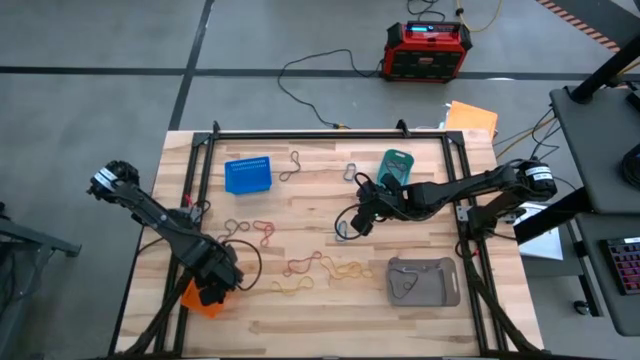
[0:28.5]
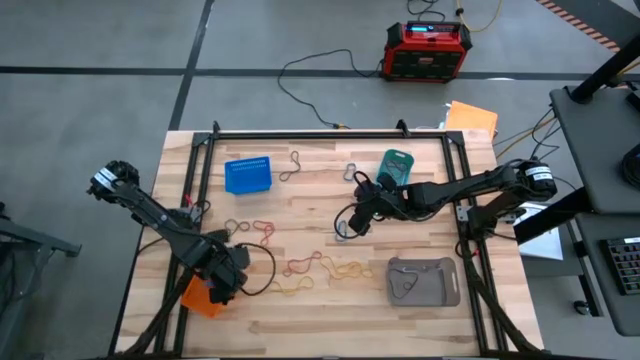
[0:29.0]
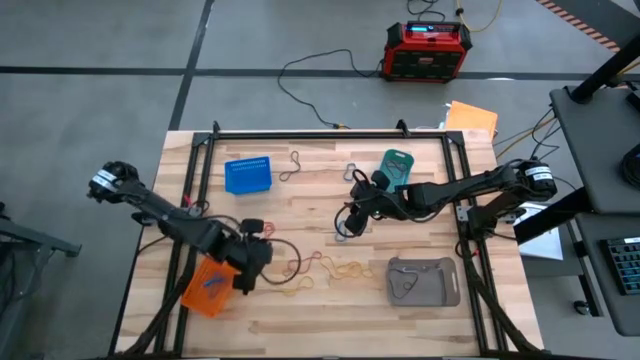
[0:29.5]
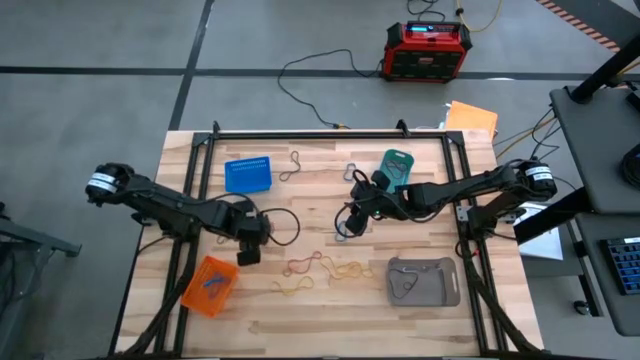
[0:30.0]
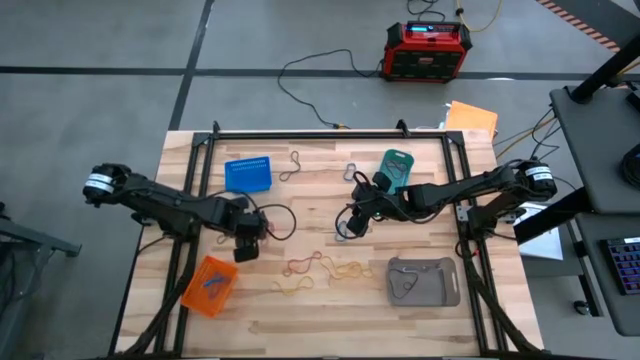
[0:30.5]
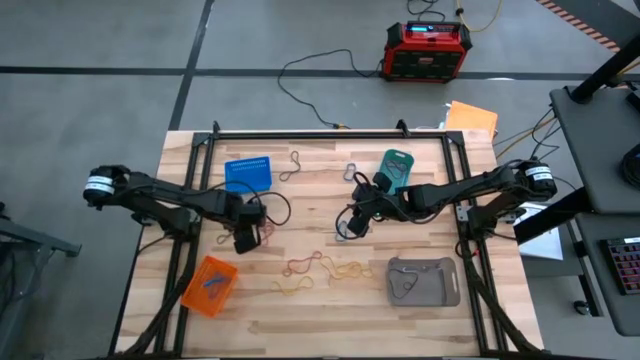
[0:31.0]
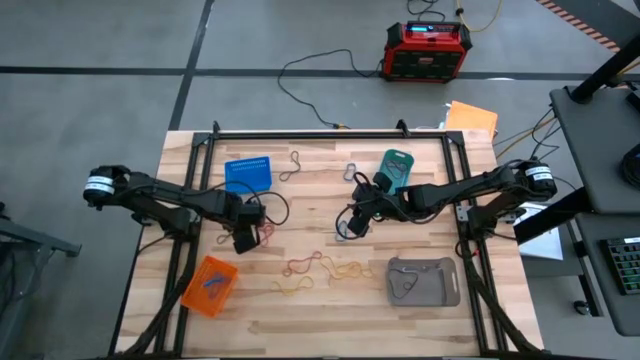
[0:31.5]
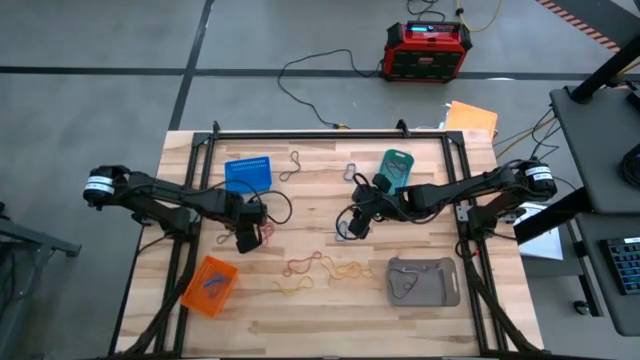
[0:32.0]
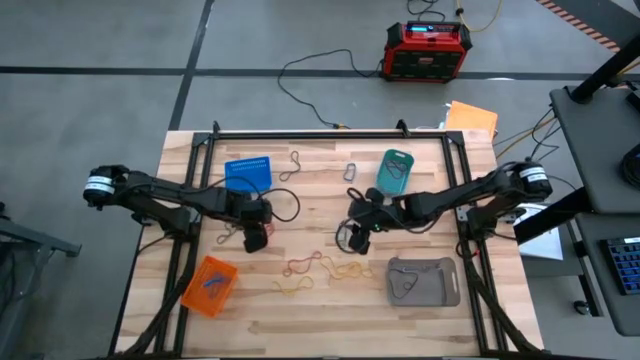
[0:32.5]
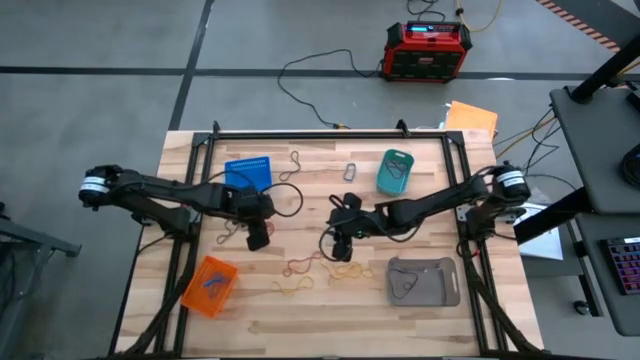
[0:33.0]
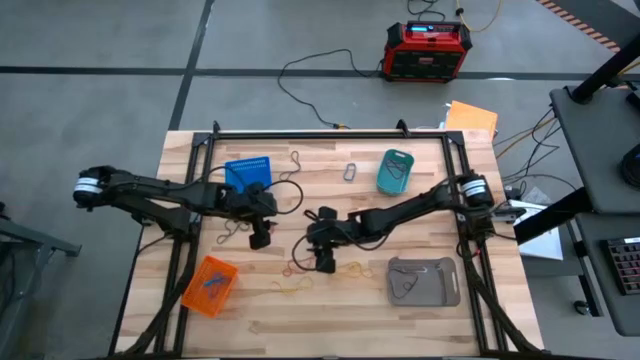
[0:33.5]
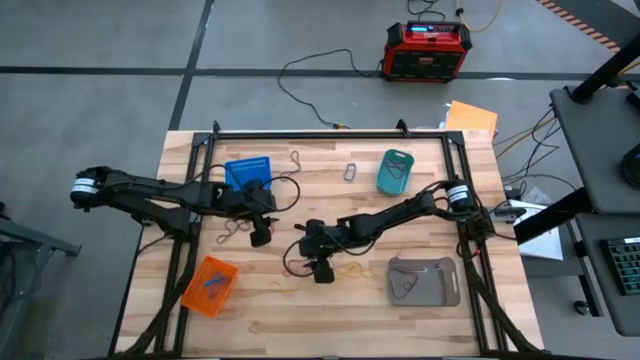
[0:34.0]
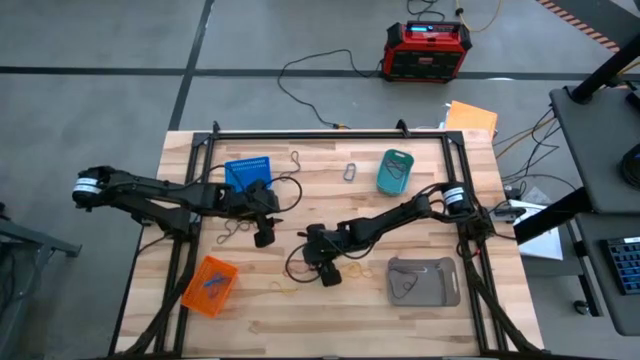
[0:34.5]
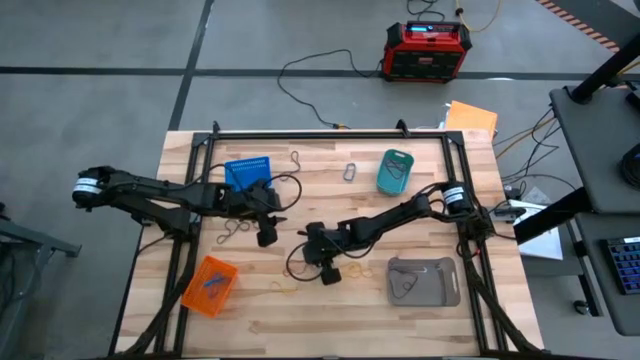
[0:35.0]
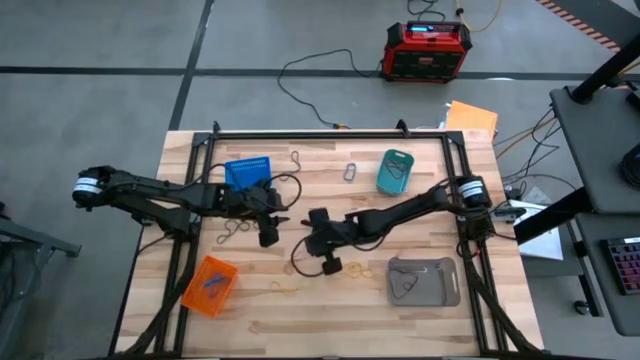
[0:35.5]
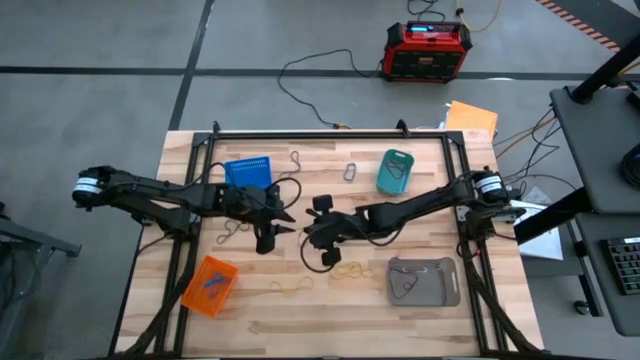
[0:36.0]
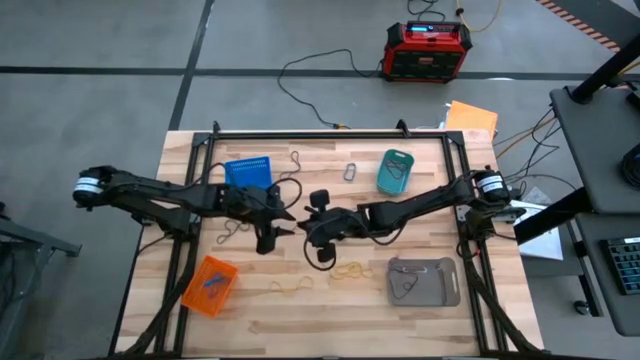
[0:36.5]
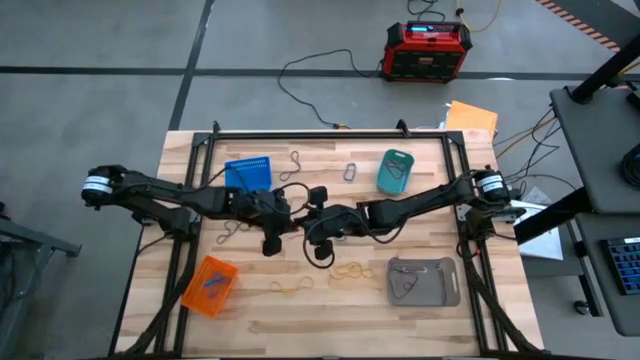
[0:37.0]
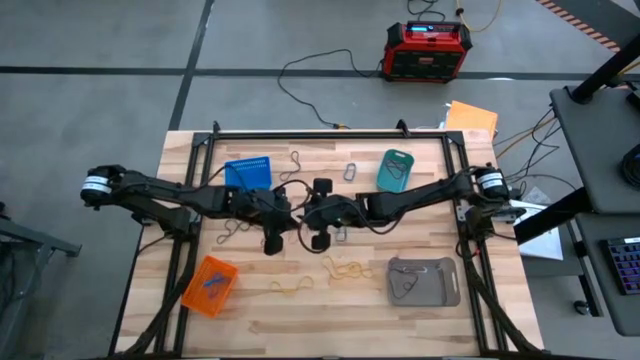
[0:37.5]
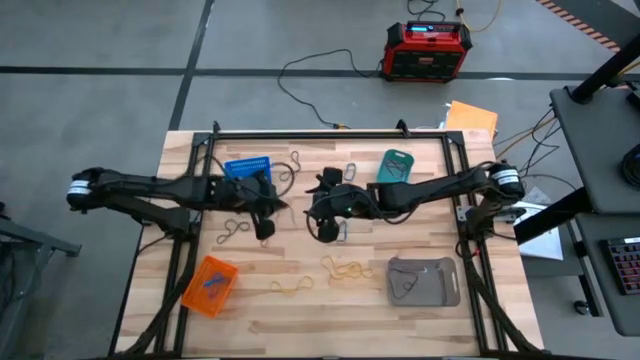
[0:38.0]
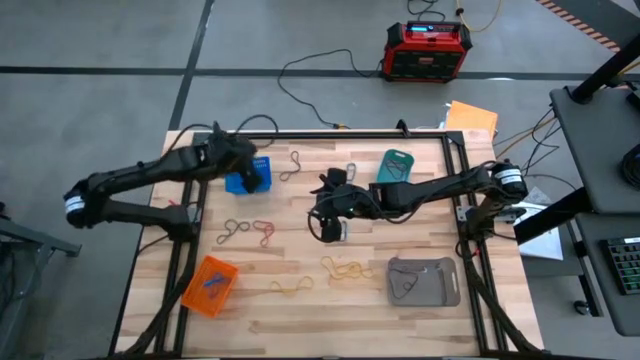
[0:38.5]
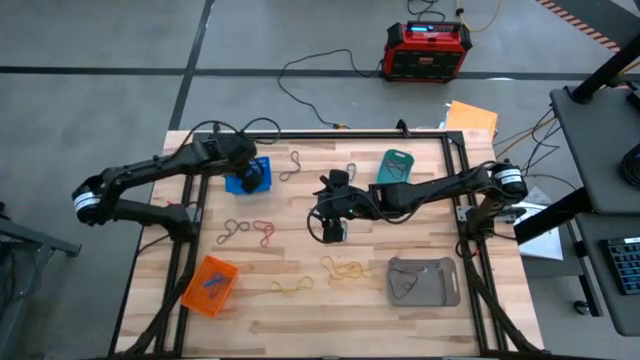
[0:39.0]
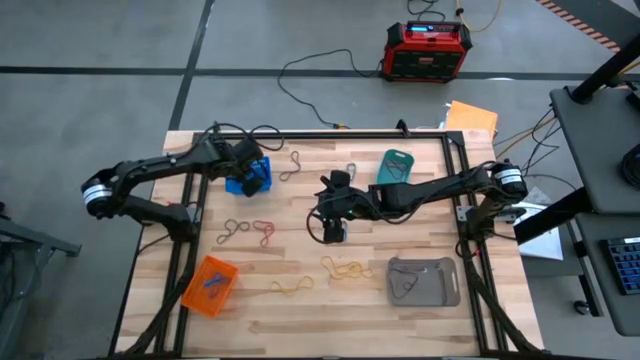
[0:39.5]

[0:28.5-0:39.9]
Task: Sort rubber bands into baskets
Put the bottom orange rubber band into the left blue bin

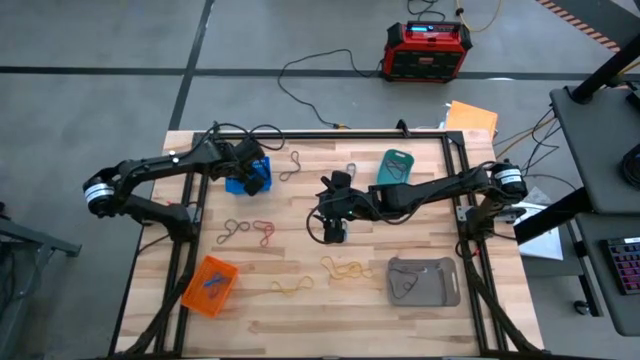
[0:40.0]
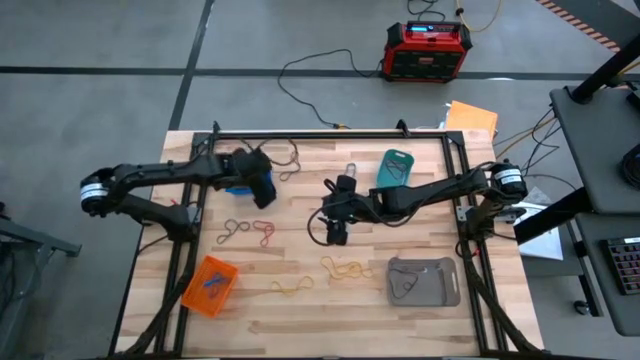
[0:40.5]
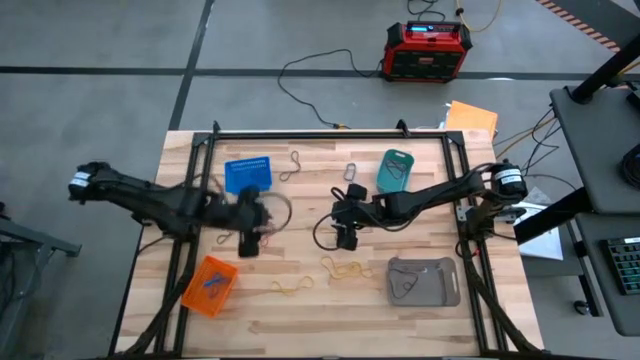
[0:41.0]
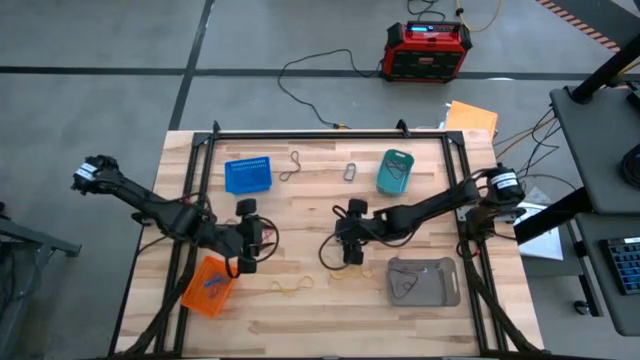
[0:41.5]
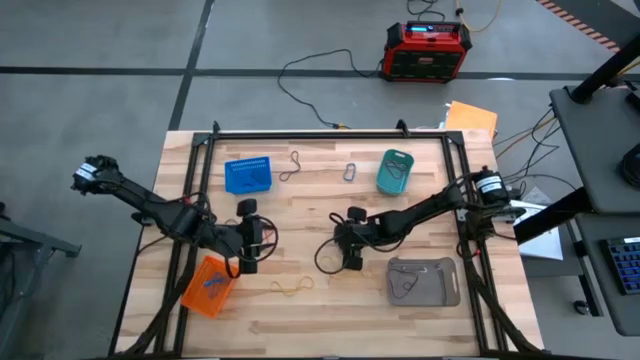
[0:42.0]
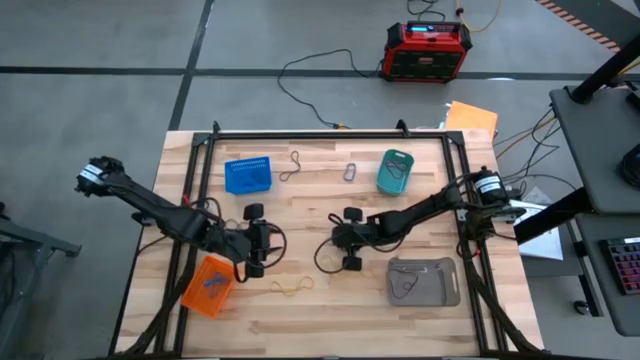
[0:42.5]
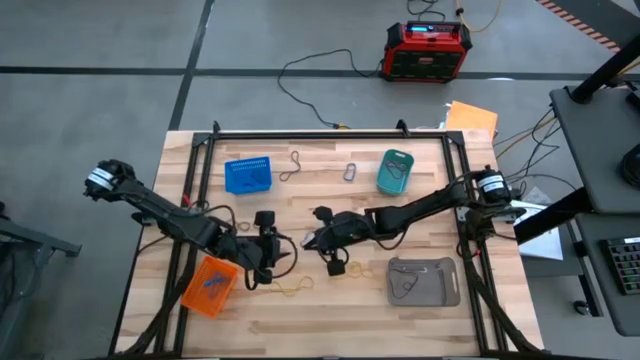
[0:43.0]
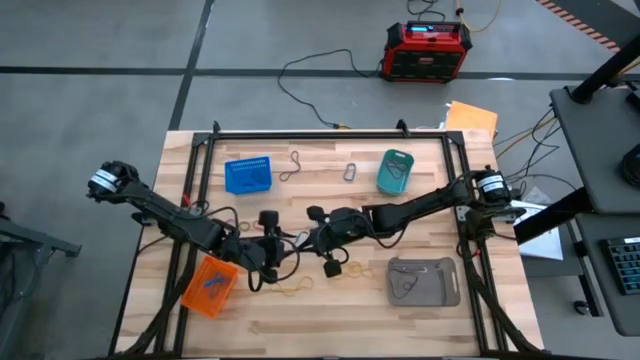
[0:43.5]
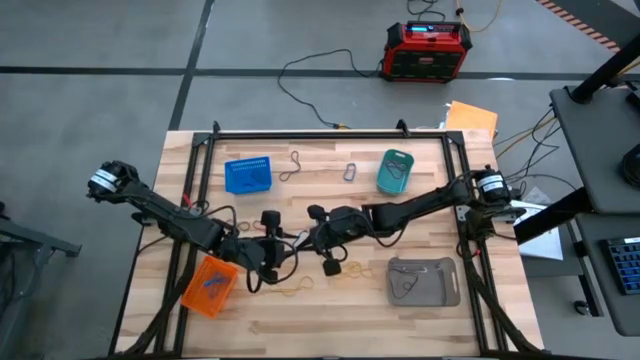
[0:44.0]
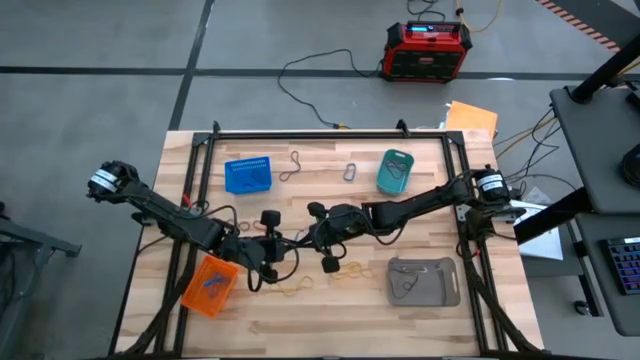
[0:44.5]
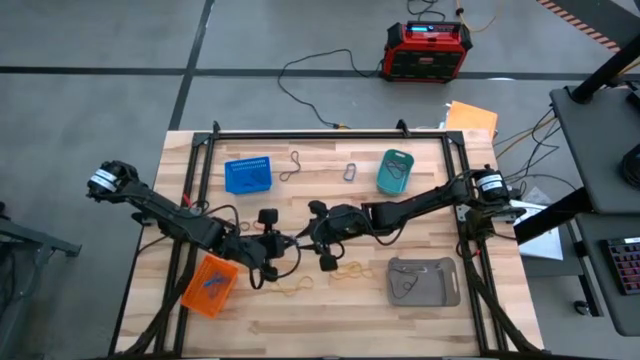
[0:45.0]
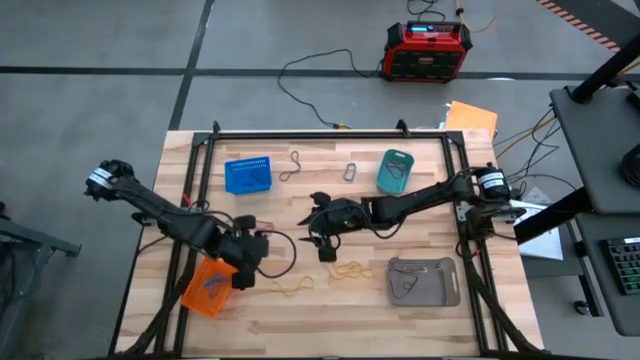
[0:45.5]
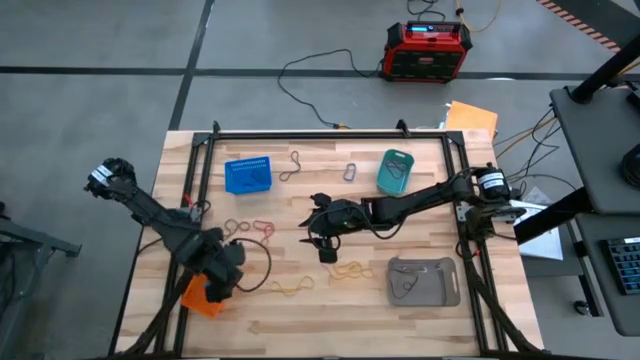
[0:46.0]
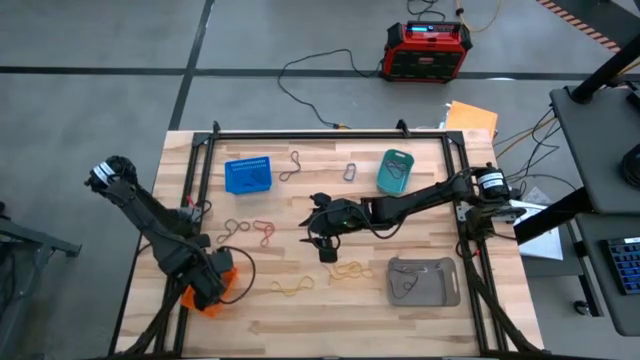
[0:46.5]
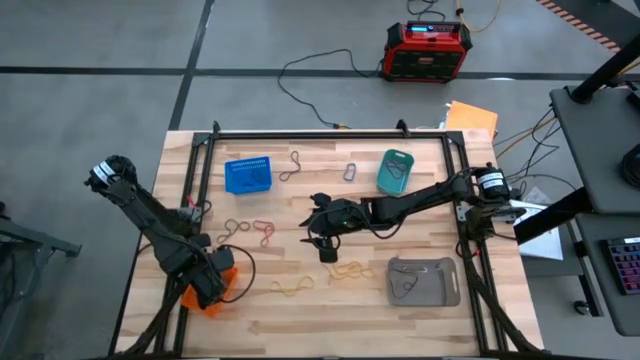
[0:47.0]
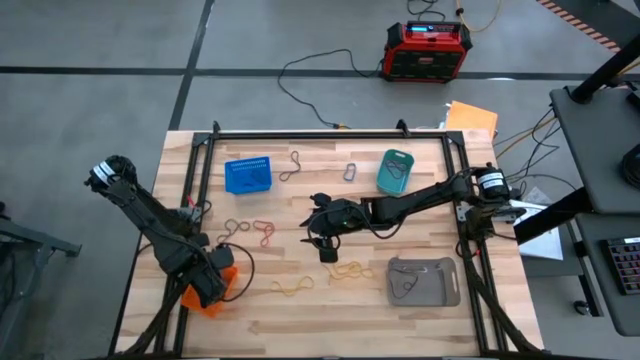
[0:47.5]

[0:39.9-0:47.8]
Put the bottom blue rubber band into the orange bin

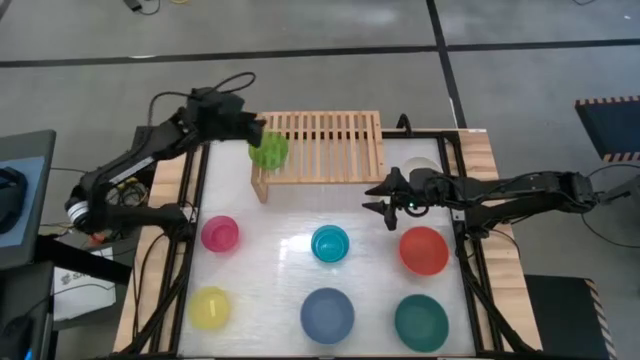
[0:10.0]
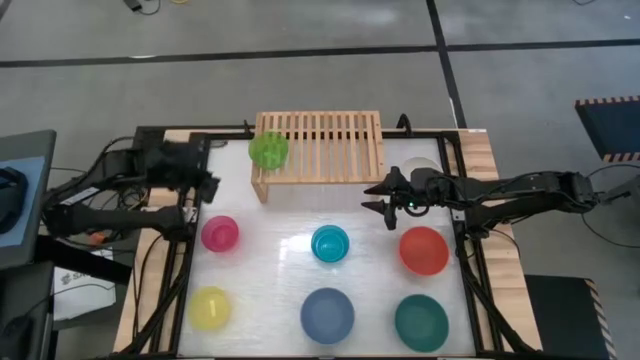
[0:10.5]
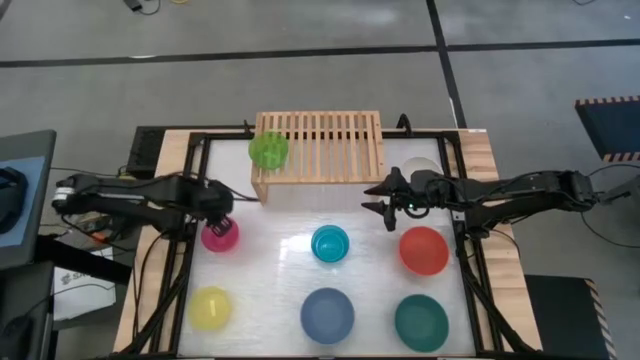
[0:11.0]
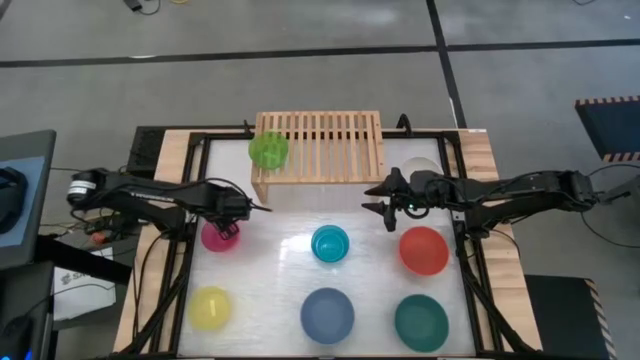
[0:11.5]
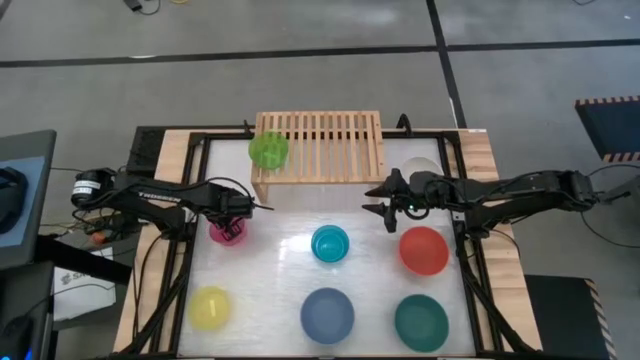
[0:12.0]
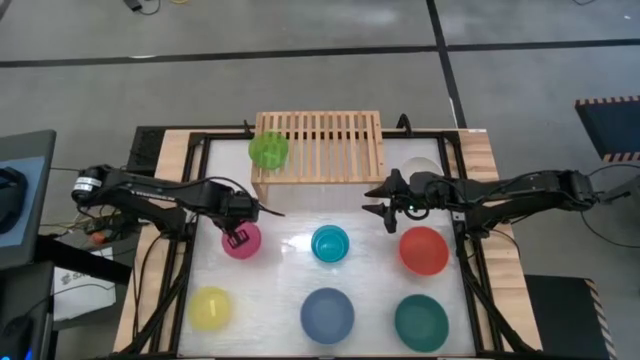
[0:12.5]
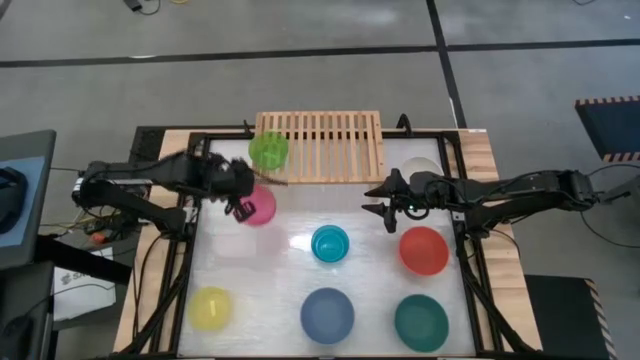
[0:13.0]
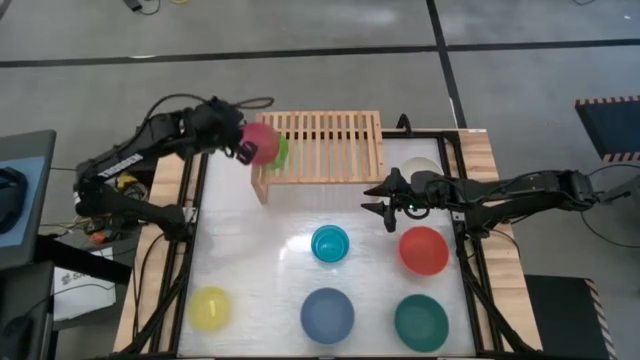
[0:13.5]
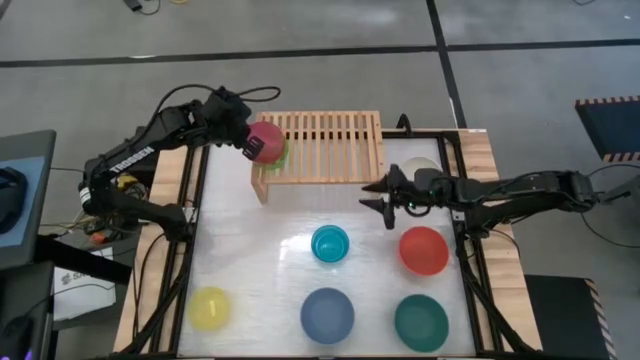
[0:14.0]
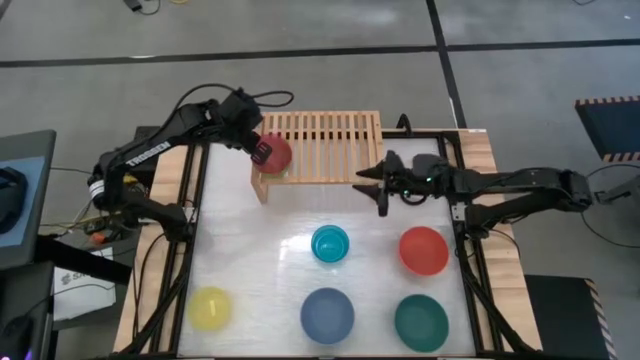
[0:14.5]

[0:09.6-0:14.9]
Task: Place and stack bowls onto a shelf
Stack the transparent pink bowl on top of the transparent green bowl
